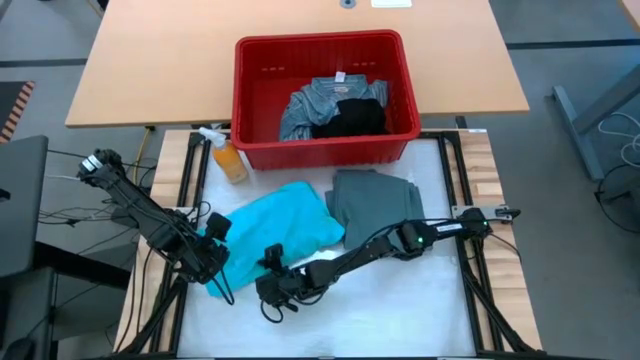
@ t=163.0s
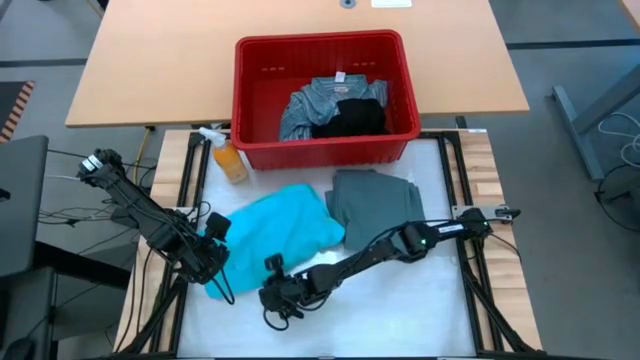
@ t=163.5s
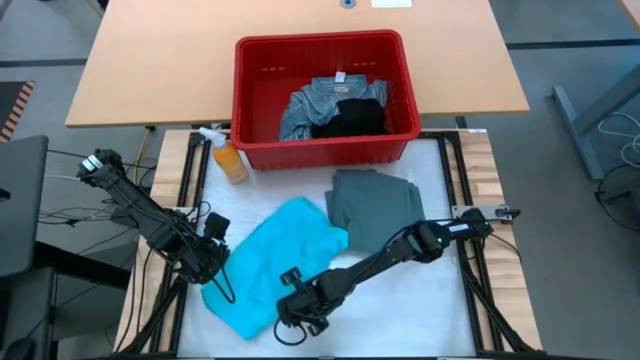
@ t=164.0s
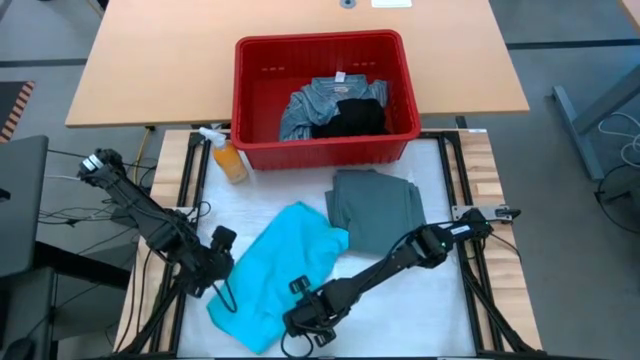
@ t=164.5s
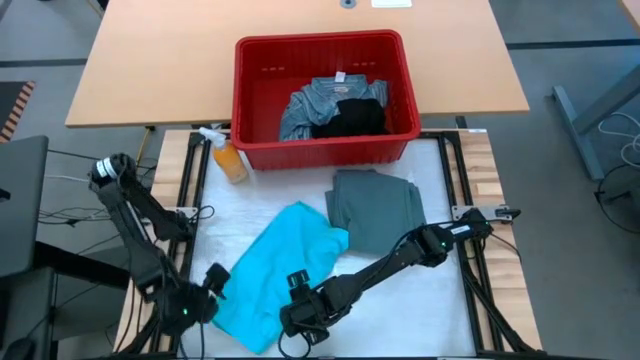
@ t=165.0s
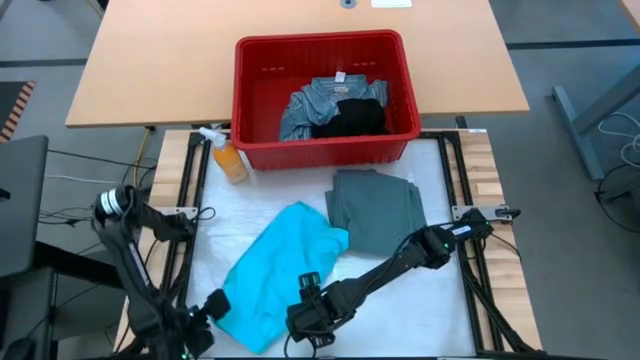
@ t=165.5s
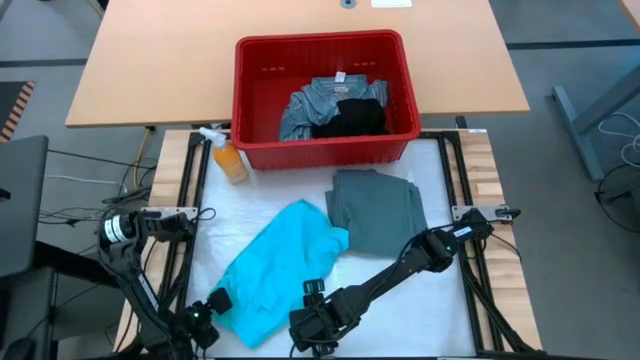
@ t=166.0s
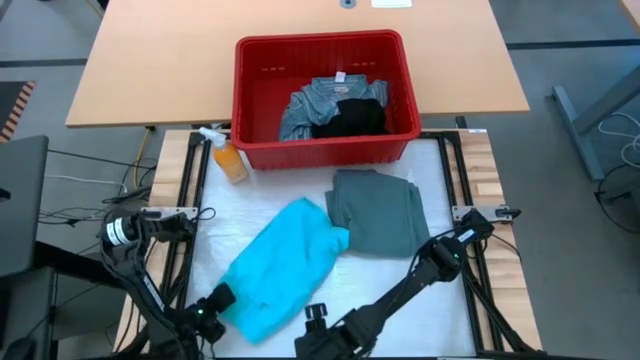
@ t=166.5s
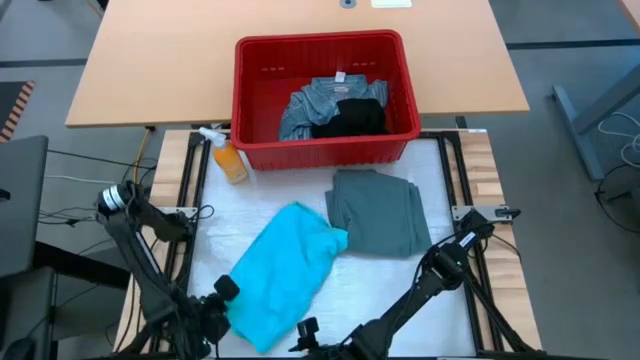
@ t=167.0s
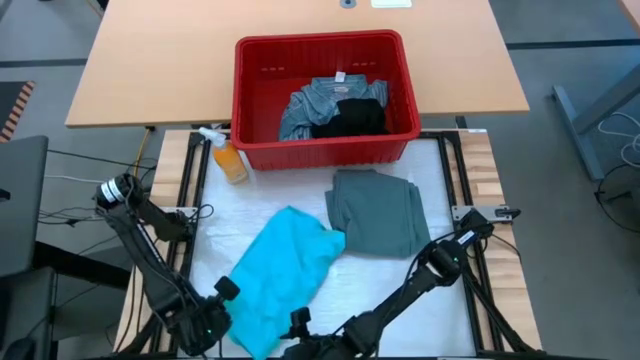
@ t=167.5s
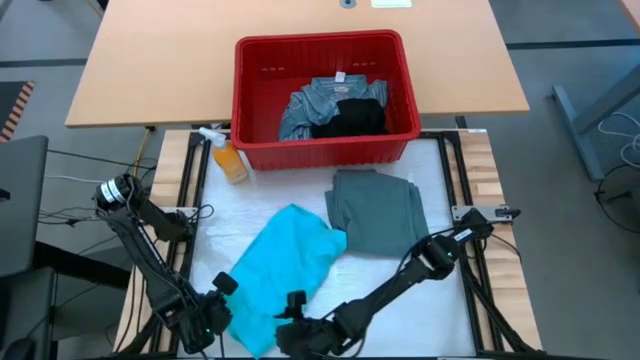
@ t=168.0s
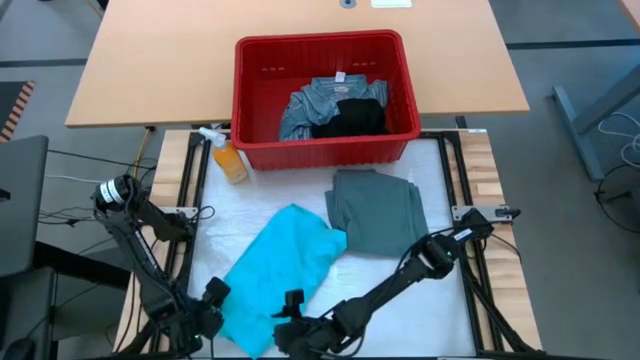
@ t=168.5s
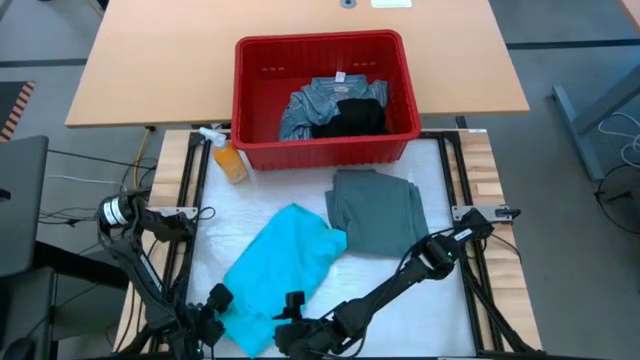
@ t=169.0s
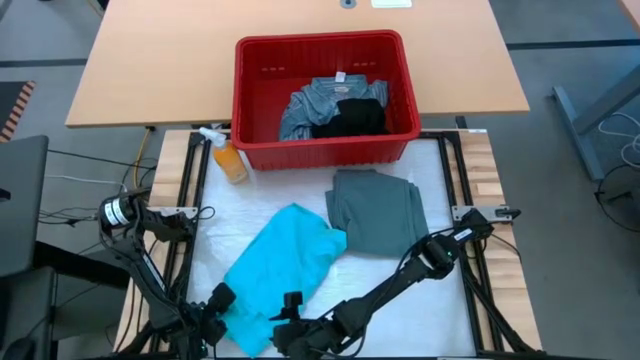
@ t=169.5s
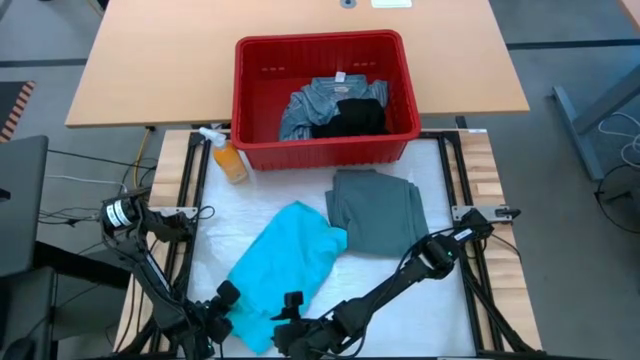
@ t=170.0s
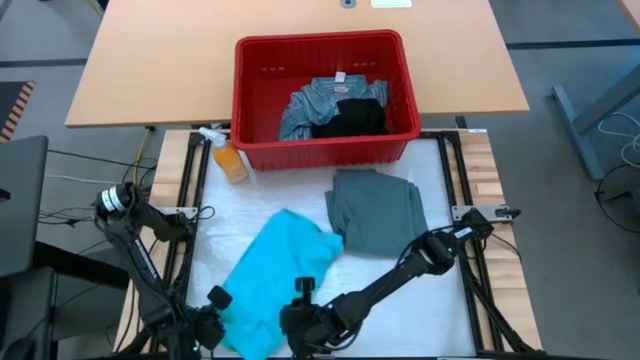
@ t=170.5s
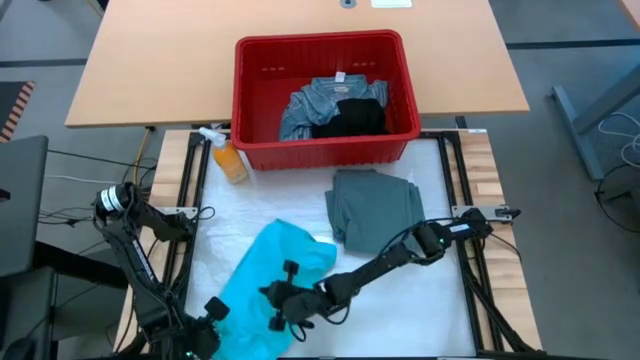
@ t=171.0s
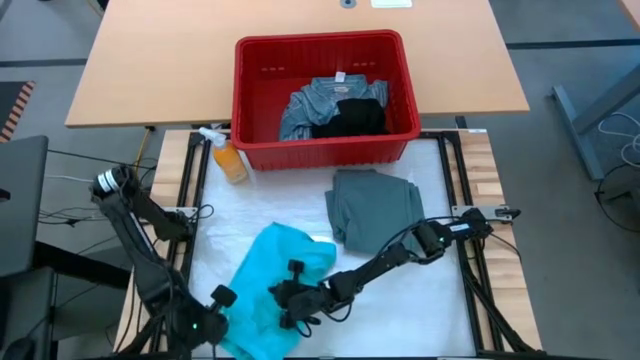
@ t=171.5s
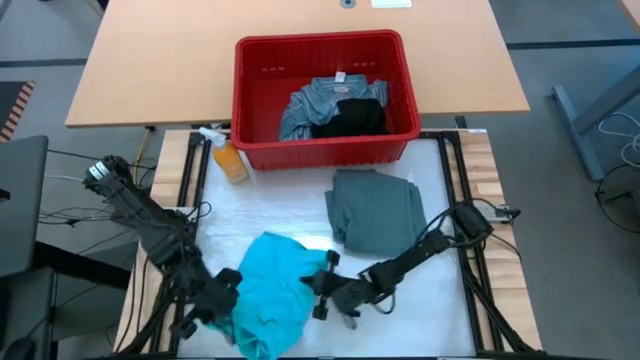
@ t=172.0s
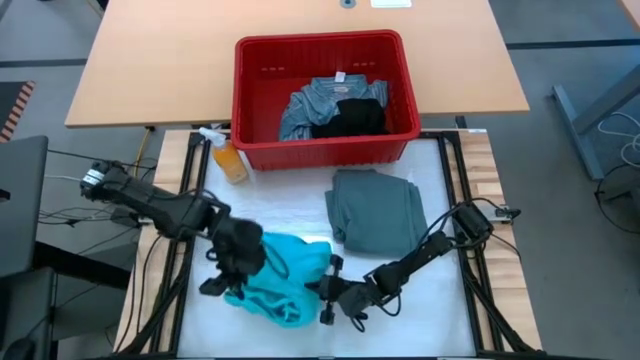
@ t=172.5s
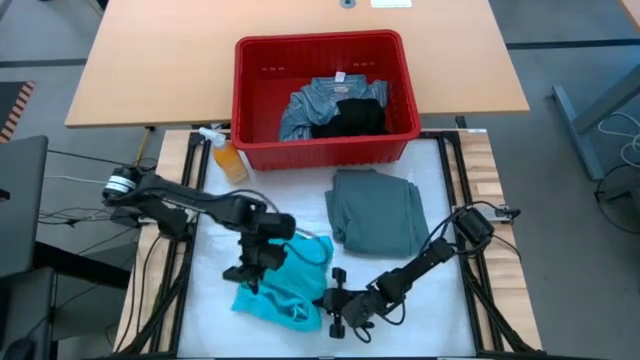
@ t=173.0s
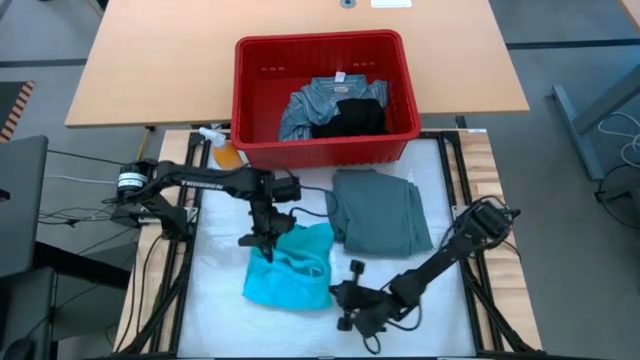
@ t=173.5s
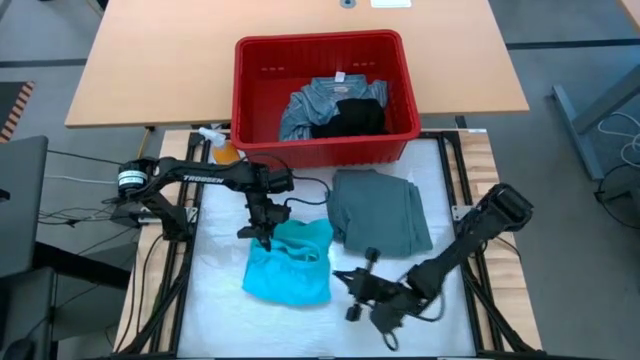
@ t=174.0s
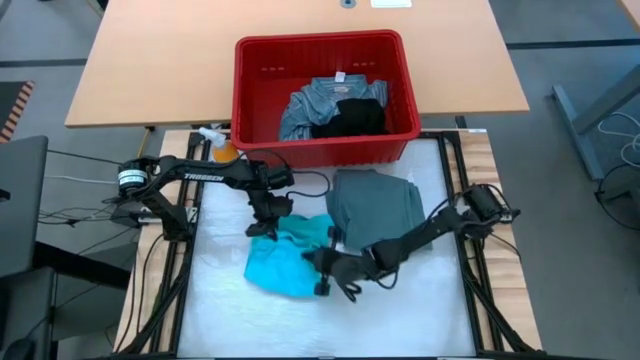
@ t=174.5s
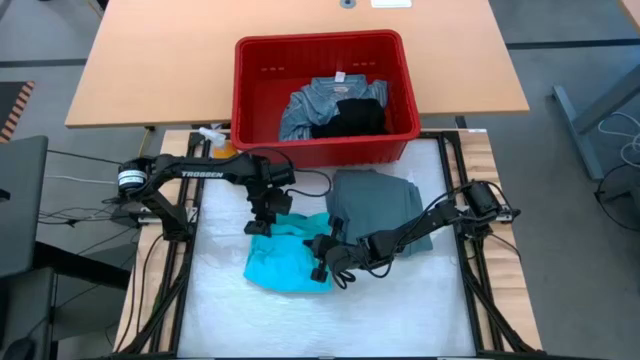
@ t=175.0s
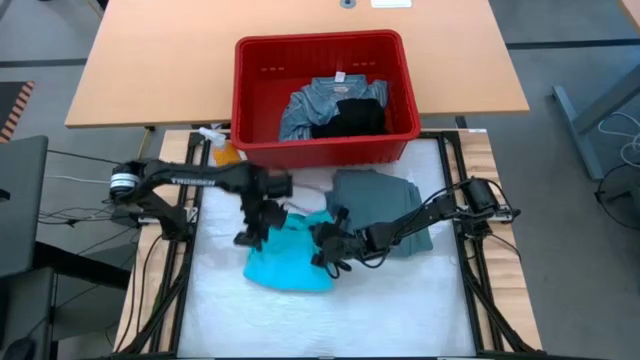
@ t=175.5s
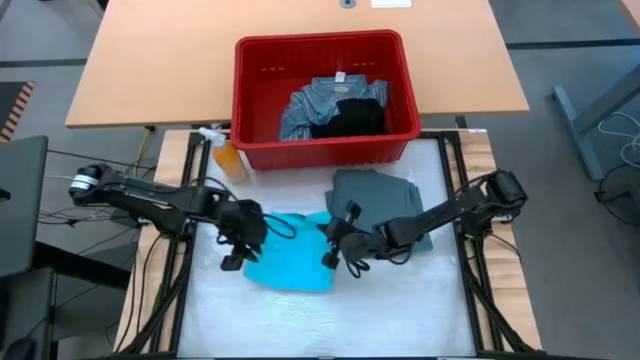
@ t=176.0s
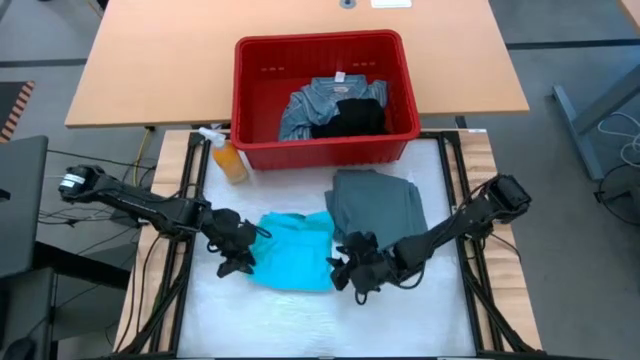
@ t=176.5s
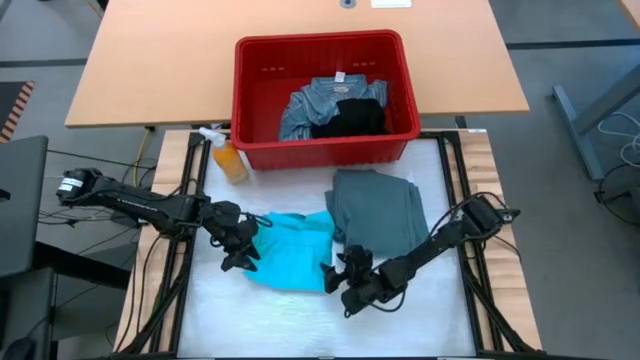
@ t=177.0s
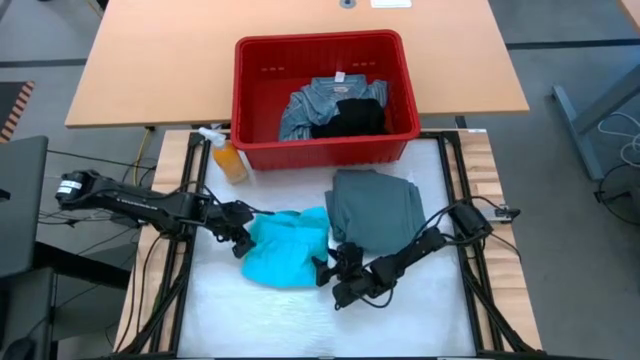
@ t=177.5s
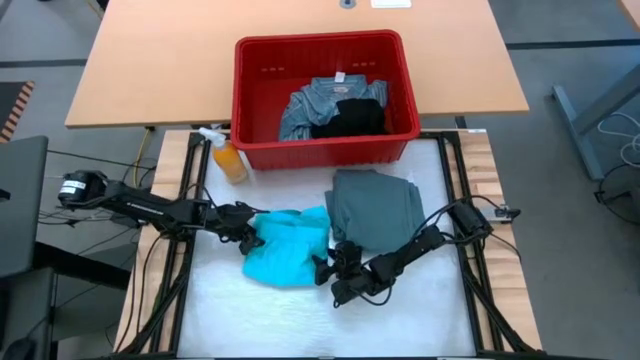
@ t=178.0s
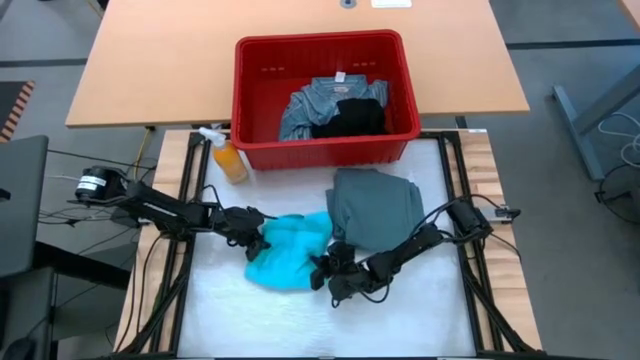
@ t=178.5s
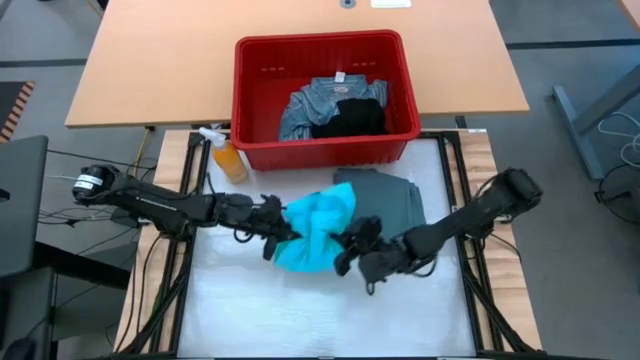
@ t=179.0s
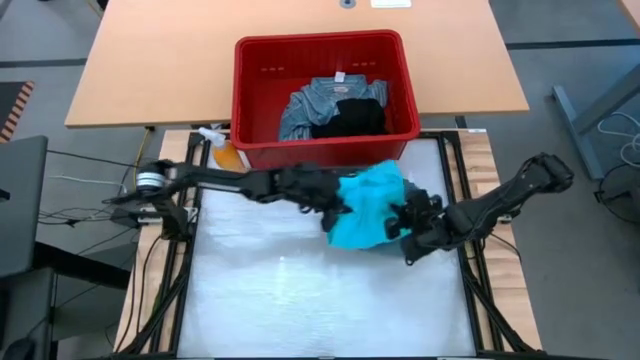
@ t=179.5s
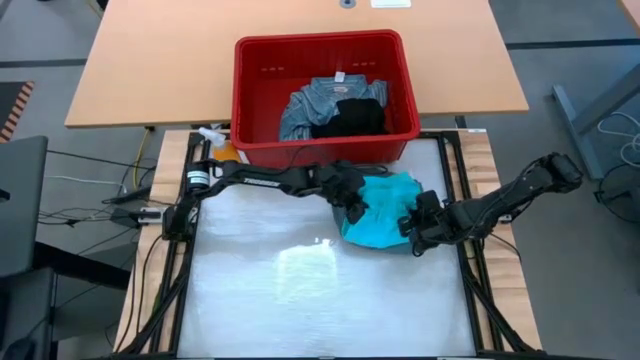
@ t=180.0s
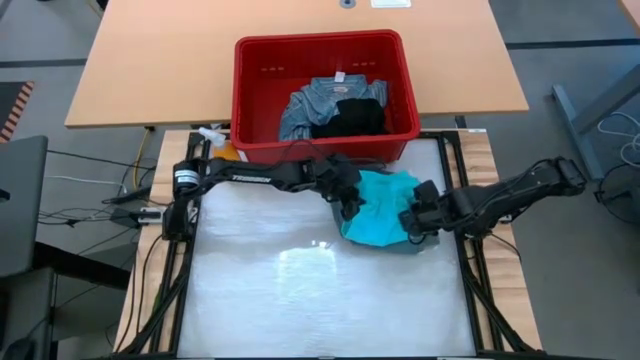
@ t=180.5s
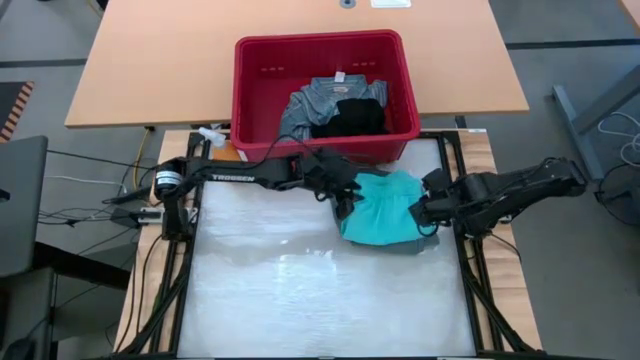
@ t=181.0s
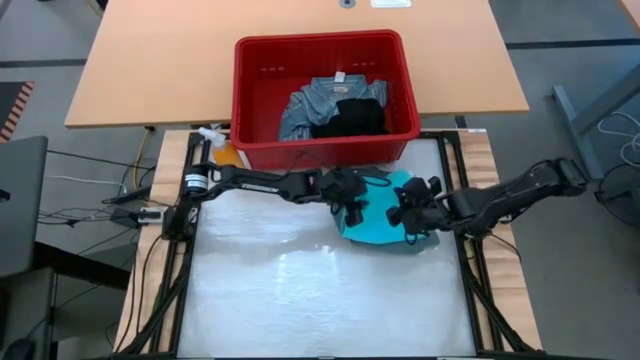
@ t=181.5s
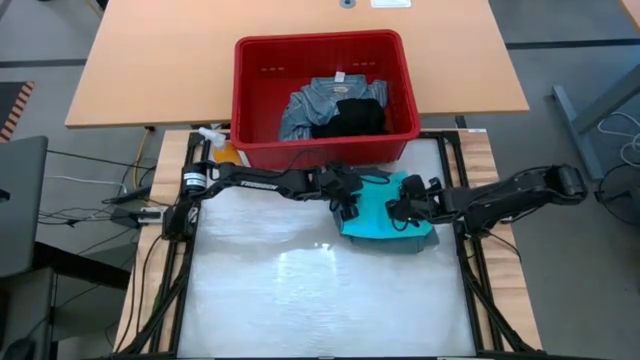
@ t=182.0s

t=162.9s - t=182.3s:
Task: Fold Laundry from Bin
Fold the light blue shorts

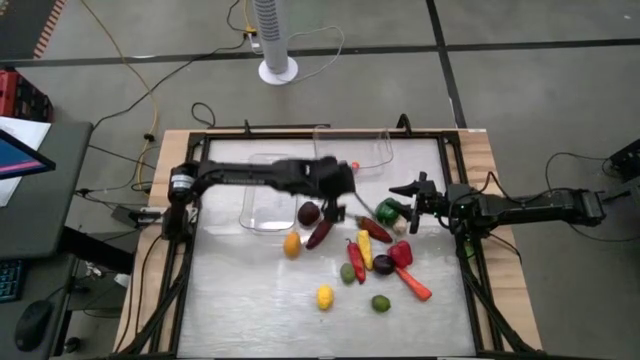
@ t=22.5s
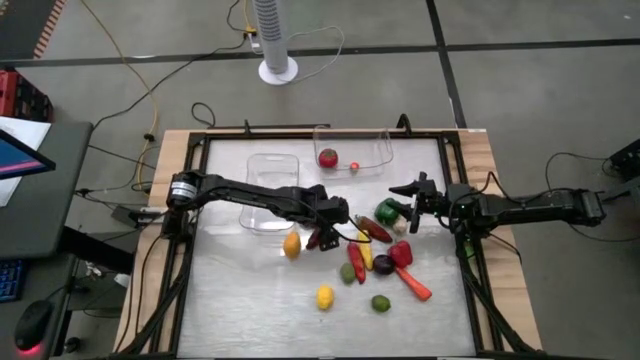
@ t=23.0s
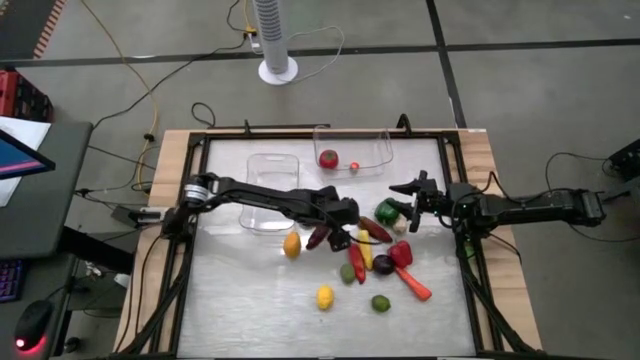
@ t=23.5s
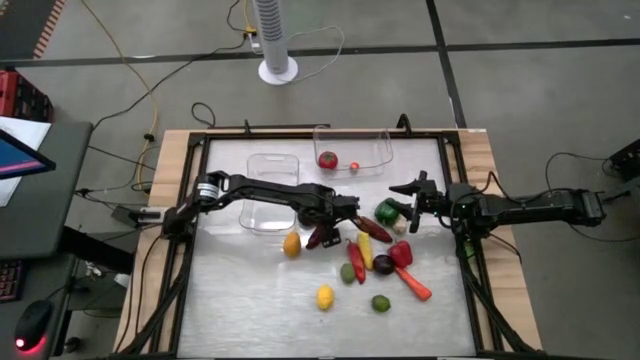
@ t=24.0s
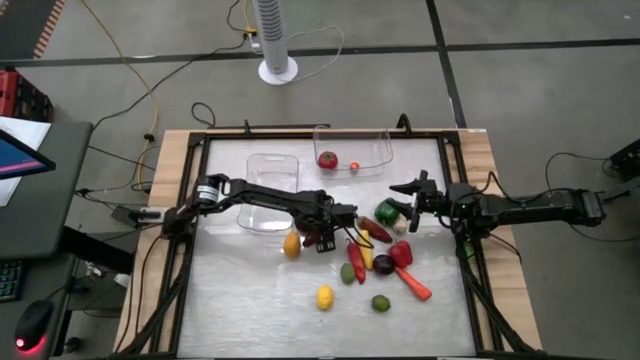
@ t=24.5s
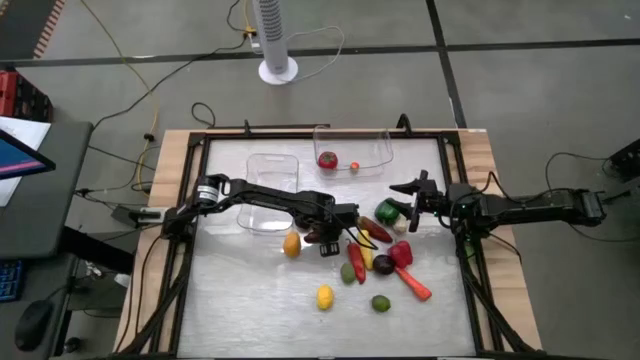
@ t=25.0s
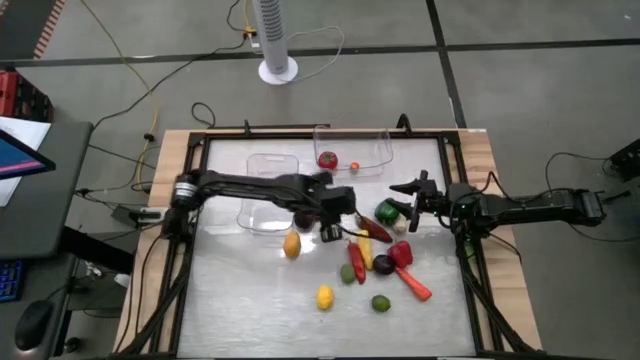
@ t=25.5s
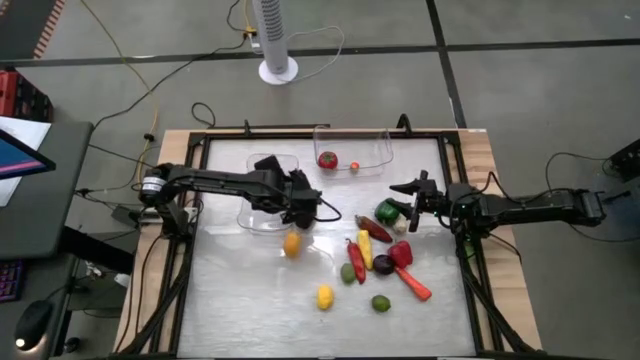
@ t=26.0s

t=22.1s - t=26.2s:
Task: Sort produce into baskets
Put the top left red chili pepper into the left transparent bin
